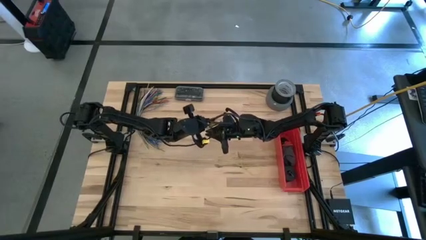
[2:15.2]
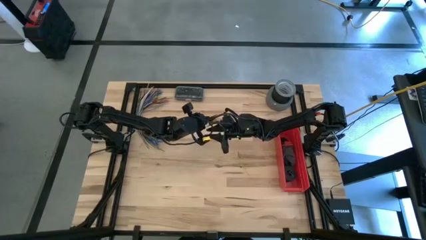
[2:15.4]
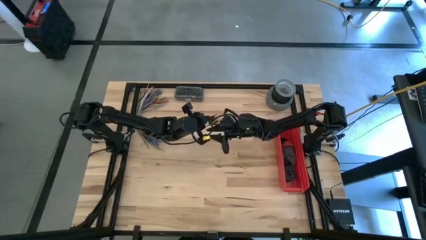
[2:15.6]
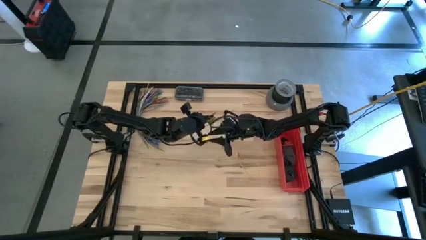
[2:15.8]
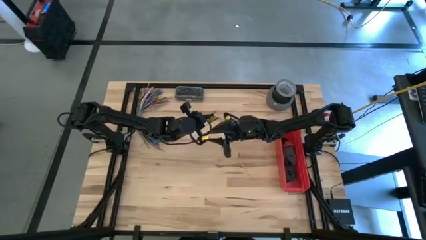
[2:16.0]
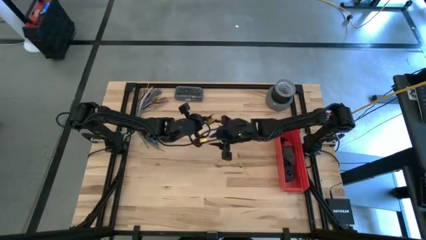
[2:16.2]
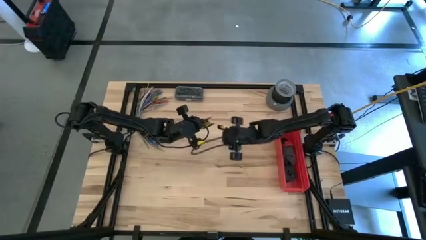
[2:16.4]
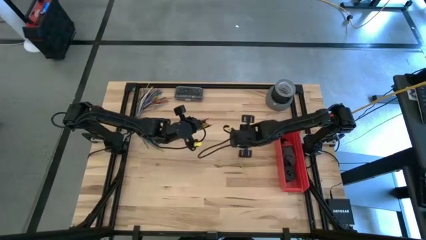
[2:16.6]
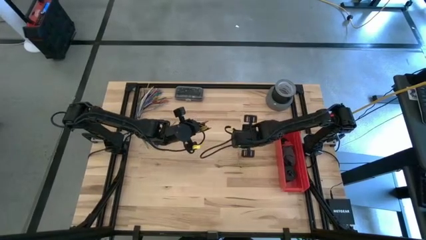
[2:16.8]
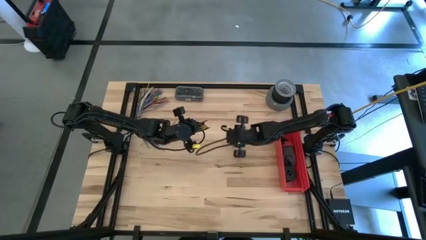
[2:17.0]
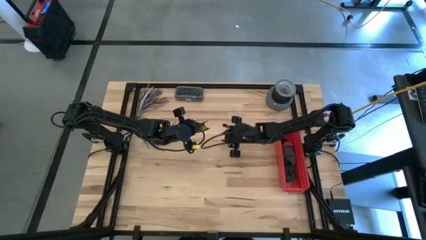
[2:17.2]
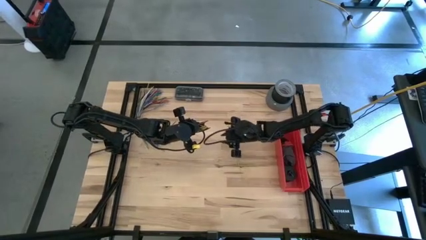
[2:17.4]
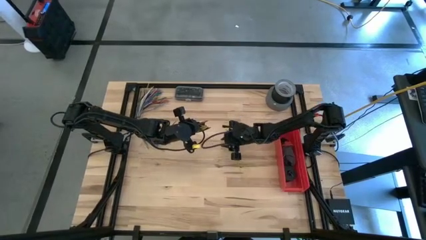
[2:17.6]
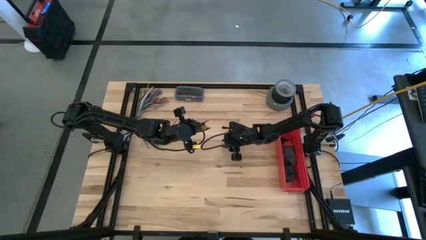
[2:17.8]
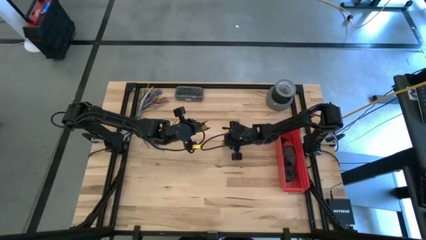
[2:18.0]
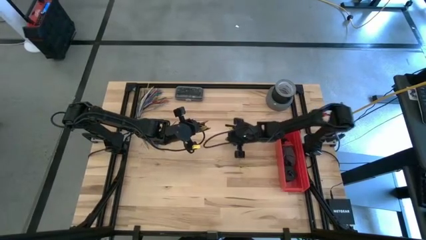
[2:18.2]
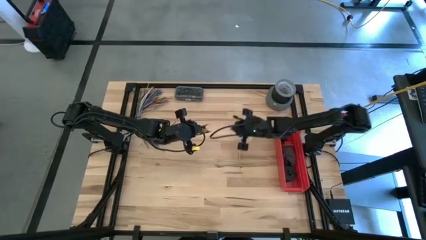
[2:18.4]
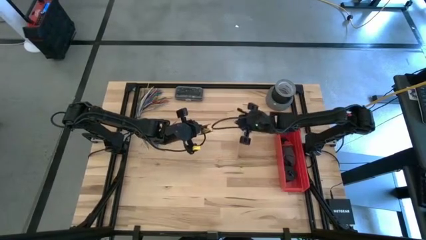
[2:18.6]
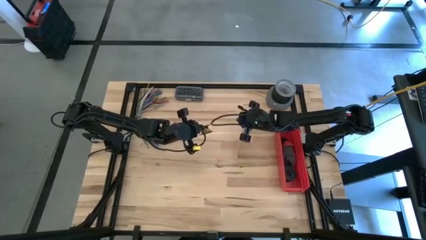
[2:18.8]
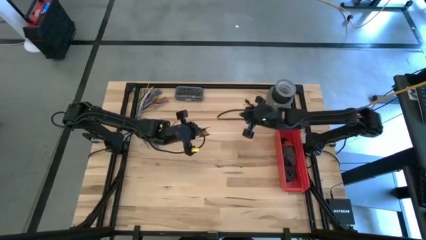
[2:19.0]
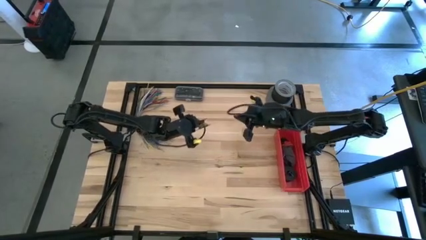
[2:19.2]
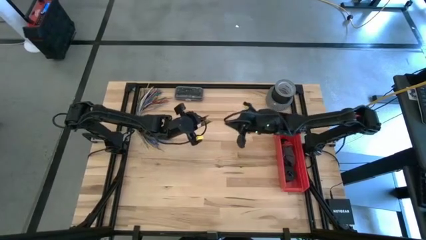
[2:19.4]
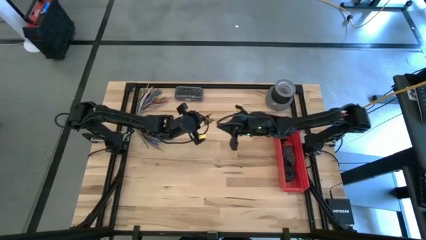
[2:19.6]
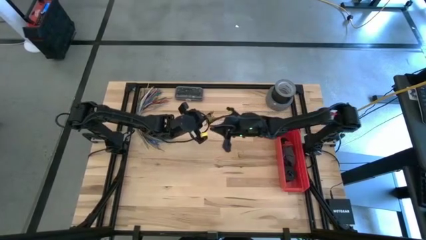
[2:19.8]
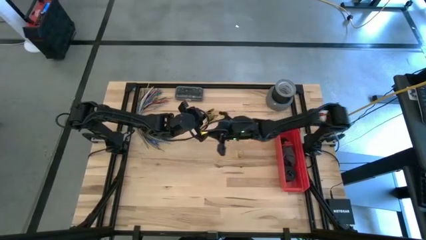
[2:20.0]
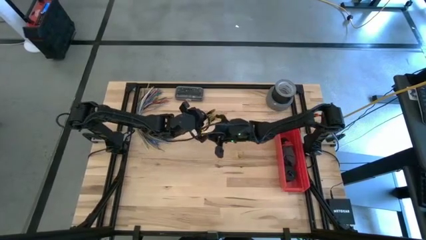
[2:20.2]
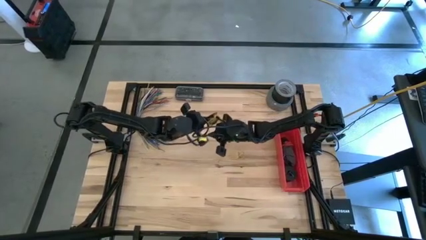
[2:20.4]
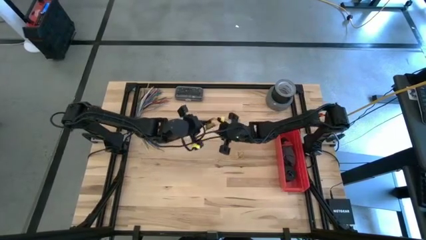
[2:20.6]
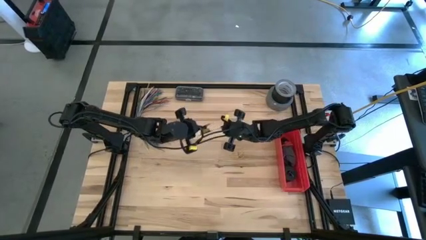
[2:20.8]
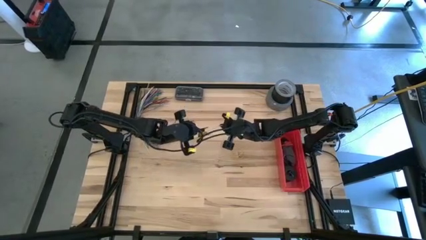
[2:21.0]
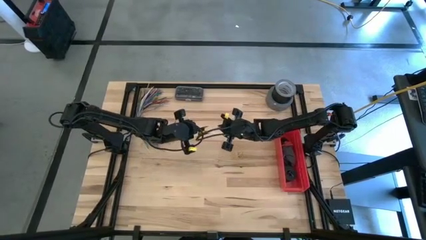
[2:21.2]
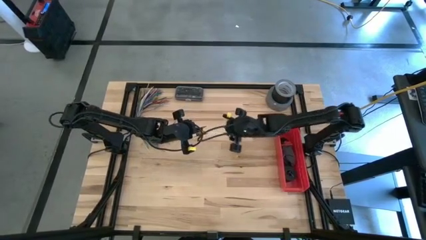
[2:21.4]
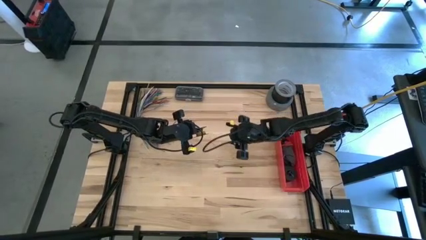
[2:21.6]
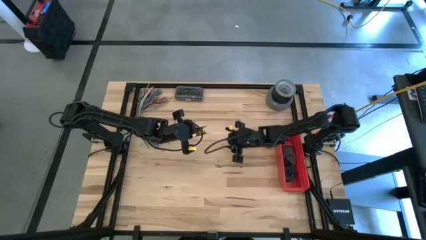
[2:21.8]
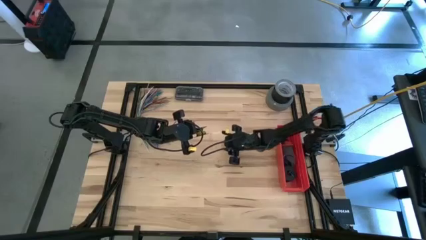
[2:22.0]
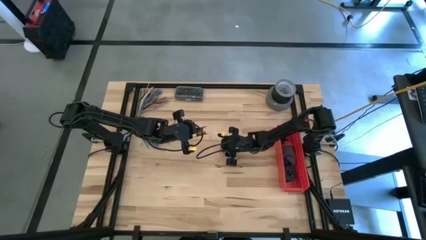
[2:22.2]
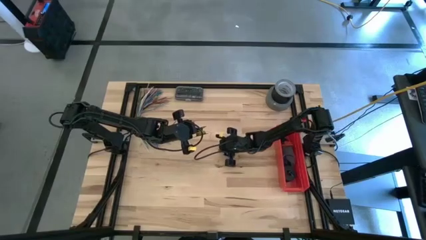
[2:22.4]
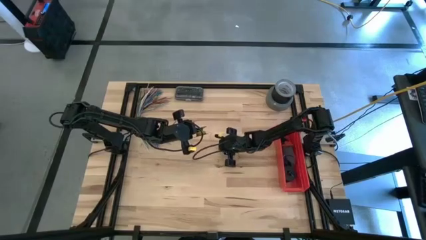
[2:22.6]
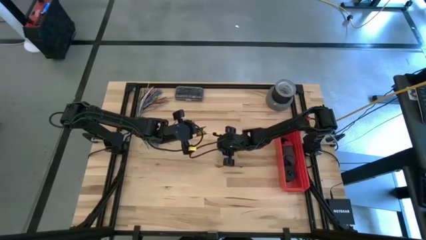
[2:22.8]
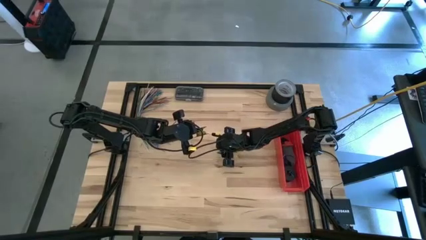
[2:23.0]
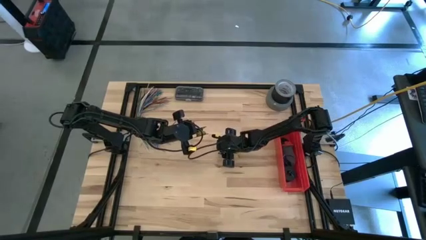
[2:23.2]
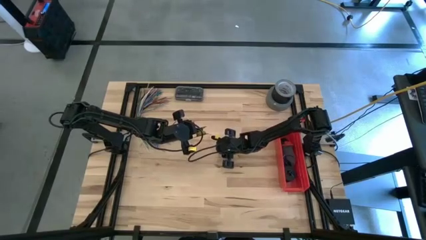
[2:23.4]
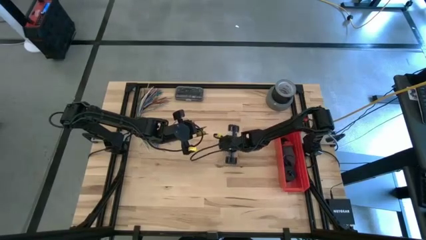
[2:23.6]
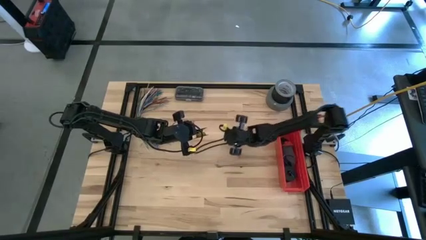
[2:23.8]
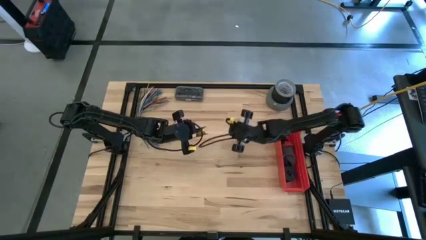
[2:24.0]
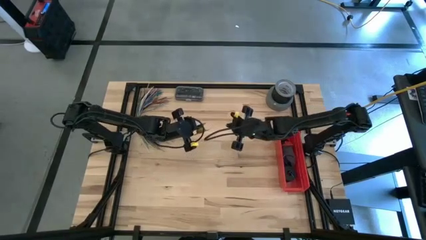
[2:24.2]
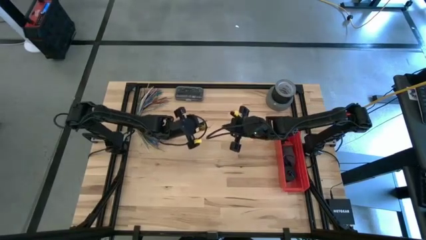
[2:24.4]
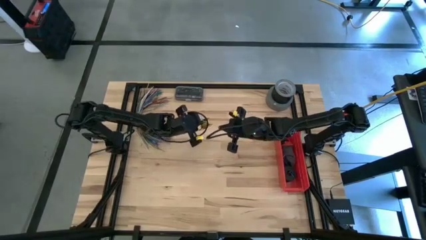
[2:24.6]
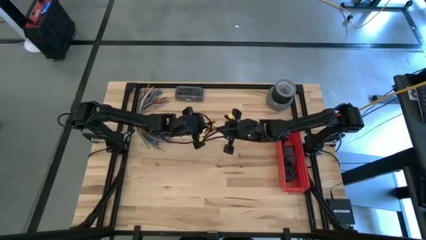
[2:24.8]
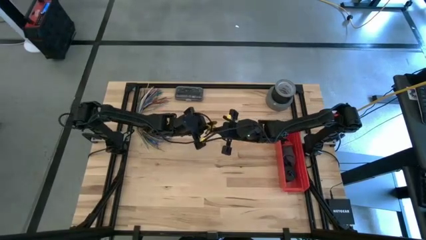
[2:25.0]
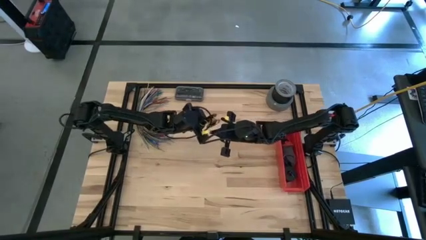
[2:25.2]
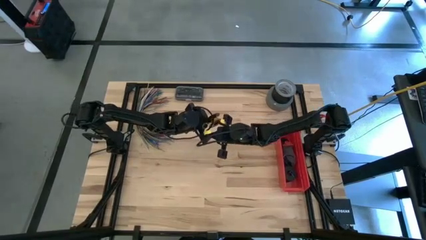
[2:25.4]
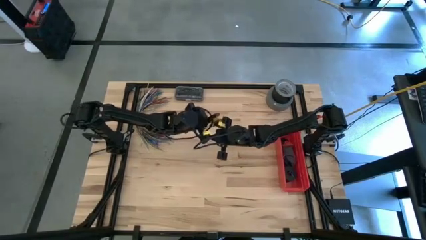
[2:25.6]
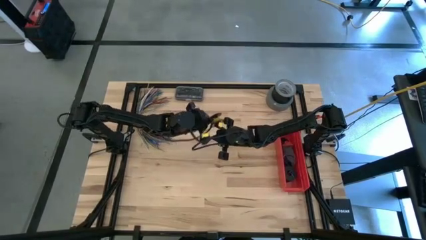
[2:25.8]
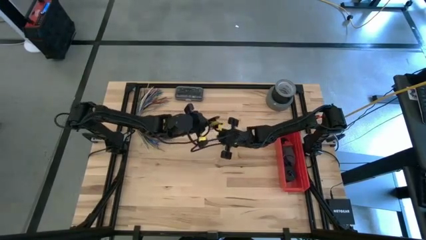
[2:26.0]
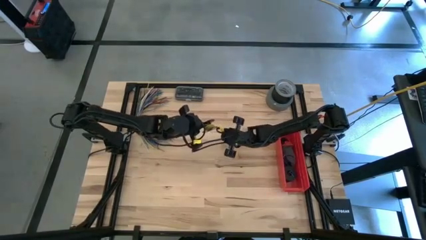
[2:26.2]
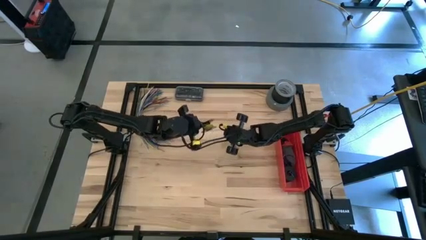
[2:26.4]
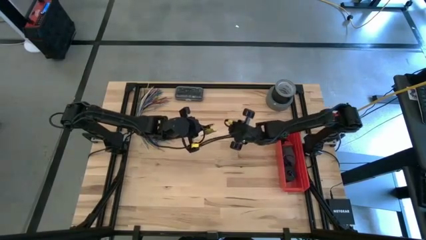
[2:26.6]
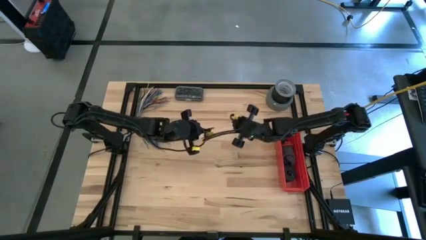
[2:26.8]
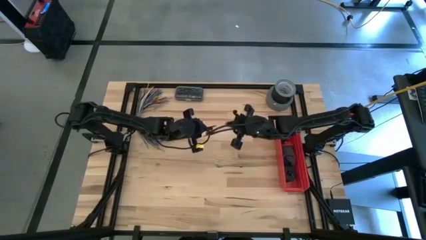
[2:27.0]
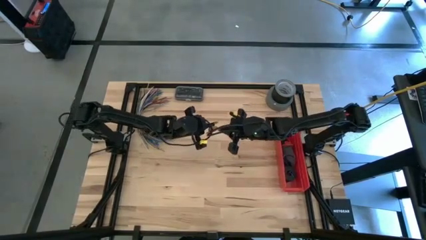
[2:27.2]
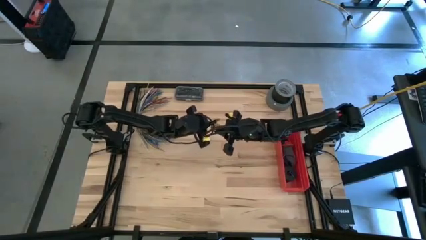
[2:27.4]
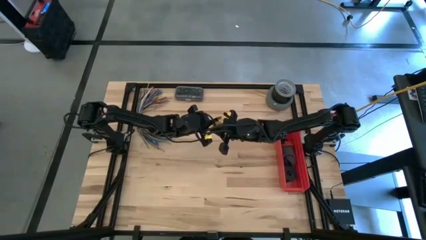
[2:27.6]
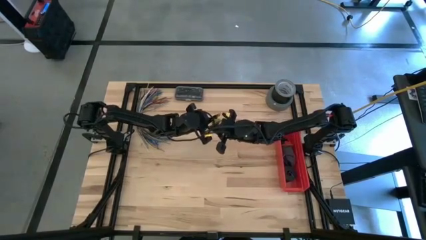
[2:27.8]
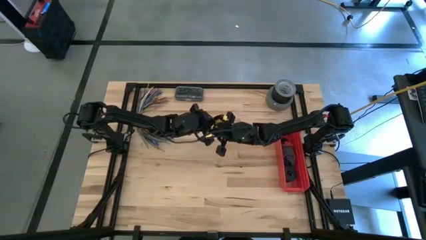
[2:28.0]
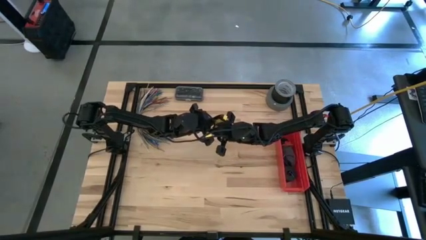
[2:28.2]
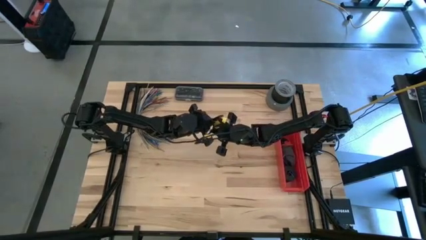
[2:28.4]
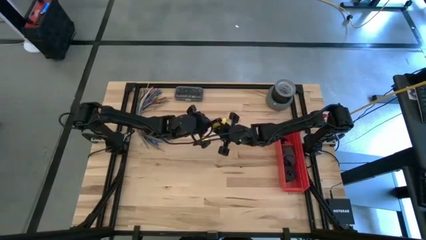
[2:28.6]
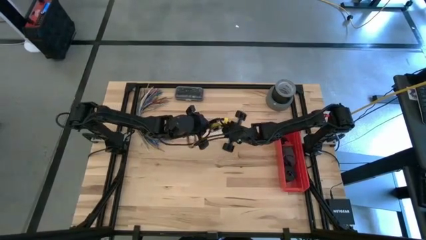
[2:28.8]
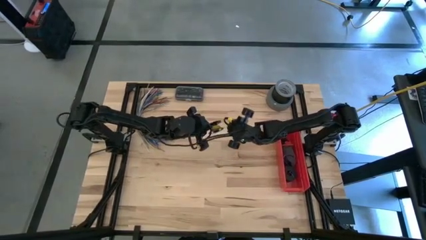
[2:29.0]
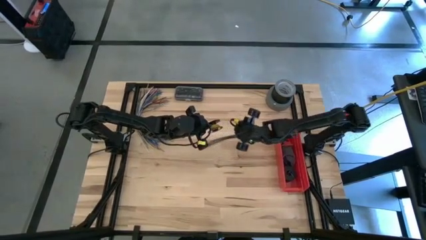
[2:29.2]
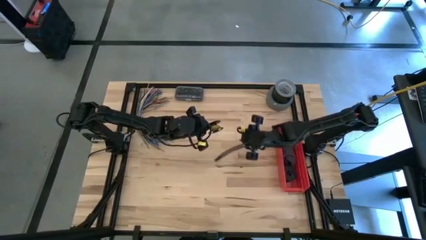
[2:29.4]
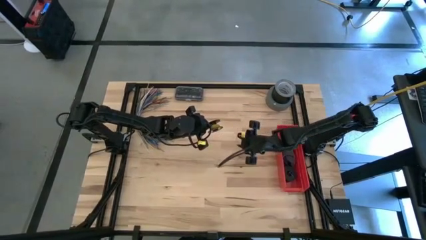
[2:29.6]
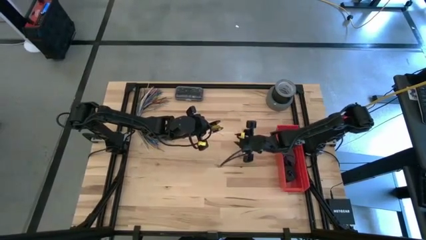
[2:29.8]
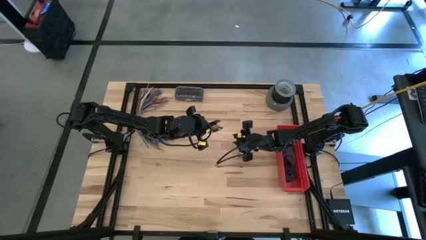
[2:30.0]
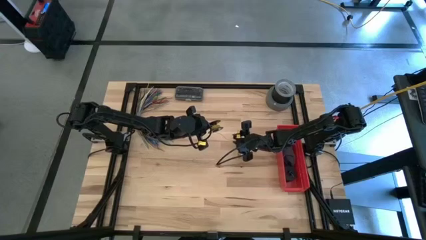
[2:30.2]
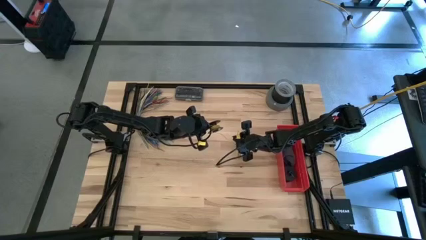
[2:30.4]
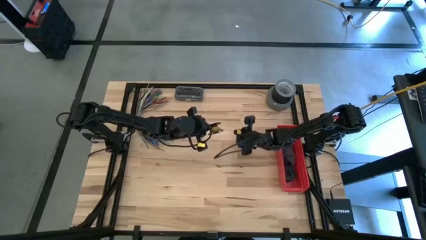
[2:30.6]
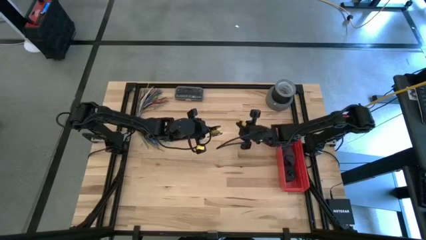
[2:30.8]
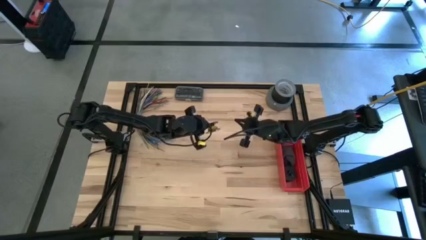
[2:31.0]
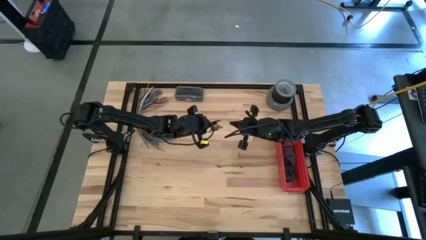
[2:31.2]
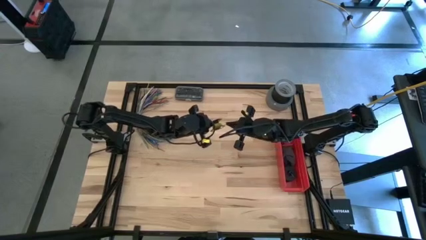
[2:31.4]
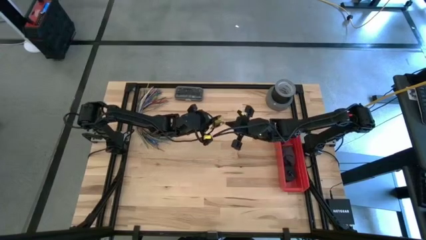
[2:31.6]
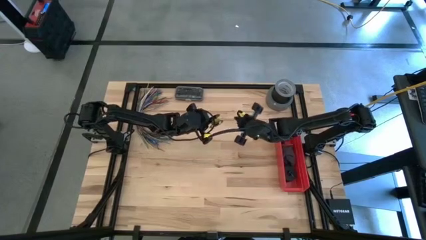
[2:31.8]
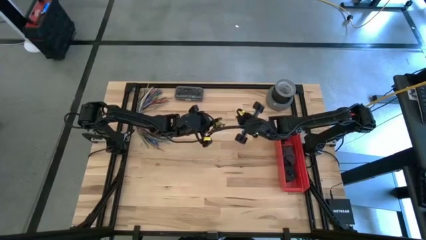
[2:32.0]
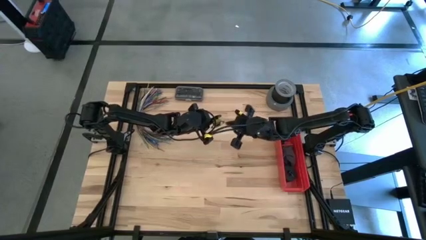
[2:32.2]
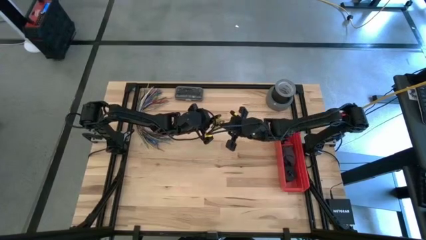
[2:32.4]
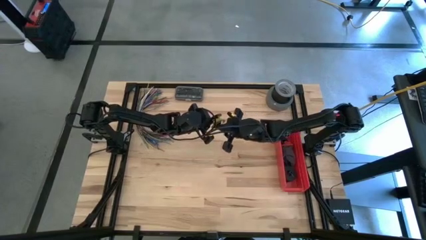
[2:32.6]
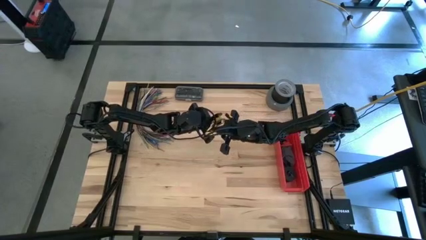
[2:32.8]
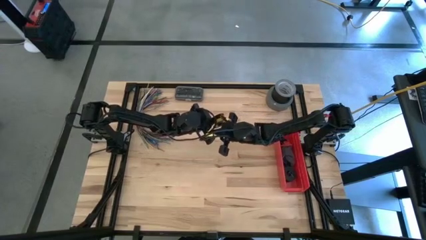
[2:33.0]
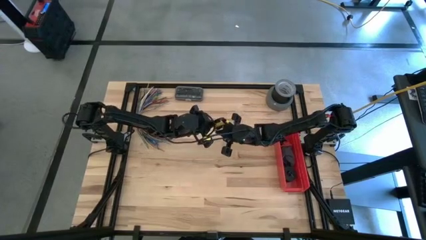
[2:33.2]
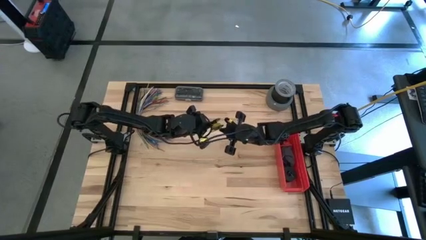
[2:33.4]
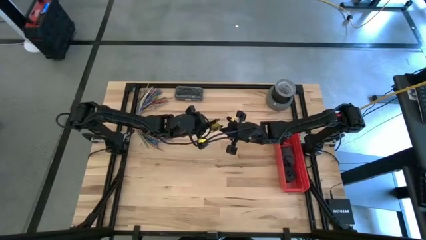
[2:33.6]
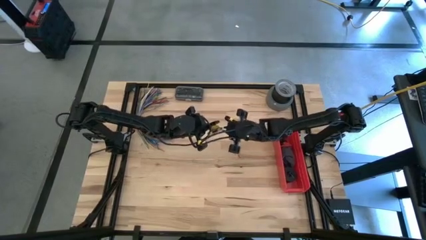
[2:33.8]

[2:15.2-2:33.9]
Task: Coil cords
Coil the yellow wire onto the black spool
